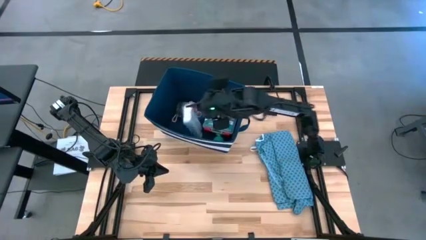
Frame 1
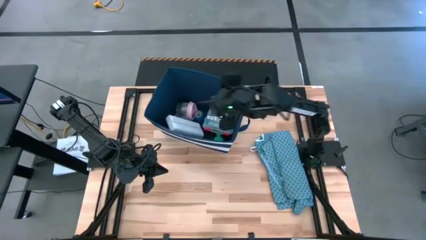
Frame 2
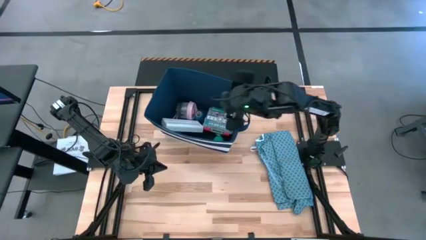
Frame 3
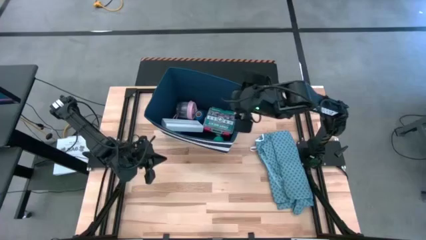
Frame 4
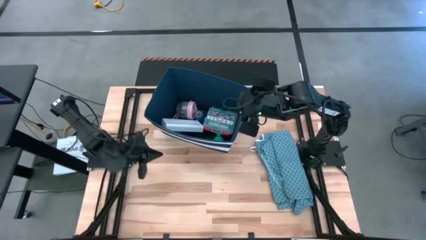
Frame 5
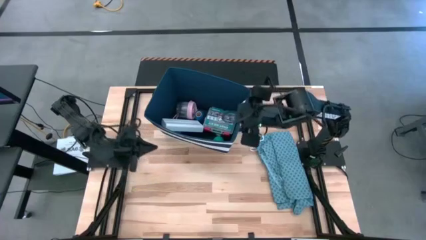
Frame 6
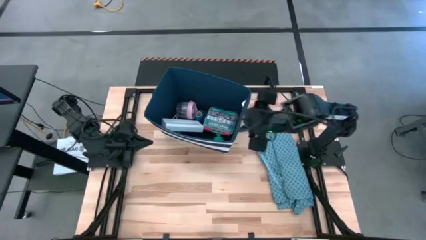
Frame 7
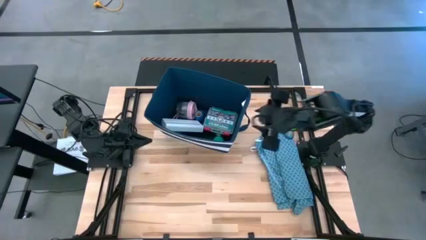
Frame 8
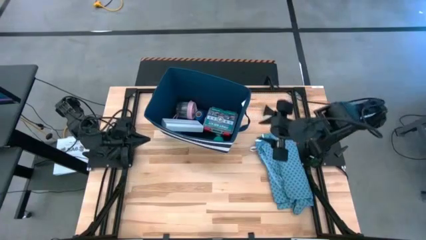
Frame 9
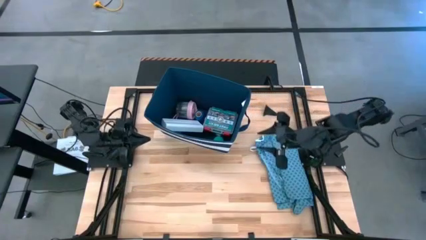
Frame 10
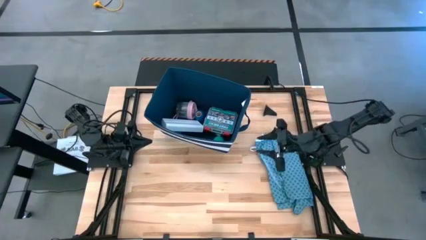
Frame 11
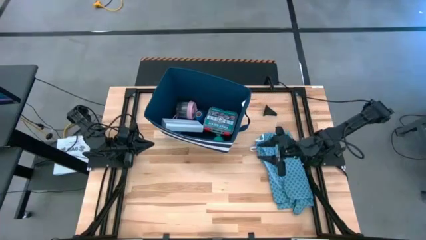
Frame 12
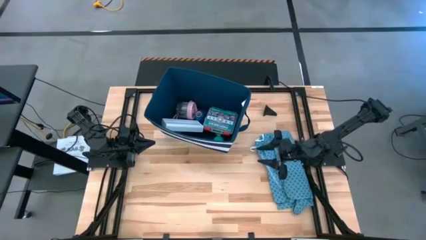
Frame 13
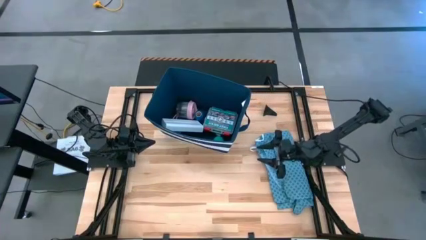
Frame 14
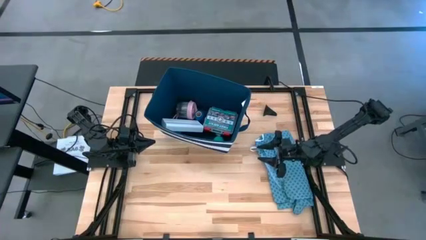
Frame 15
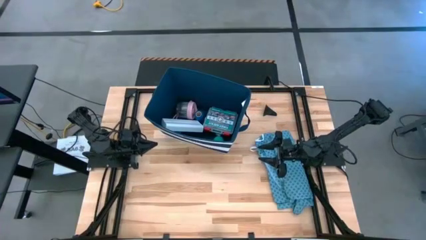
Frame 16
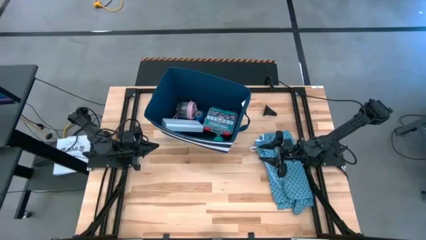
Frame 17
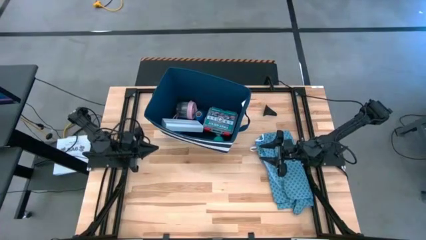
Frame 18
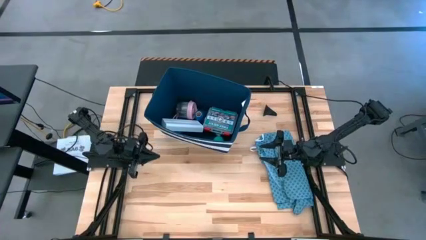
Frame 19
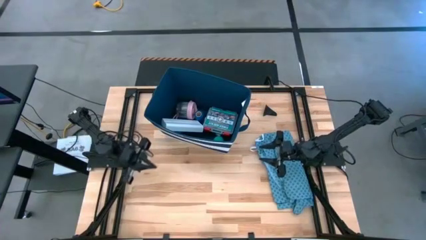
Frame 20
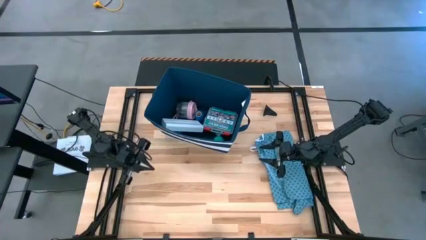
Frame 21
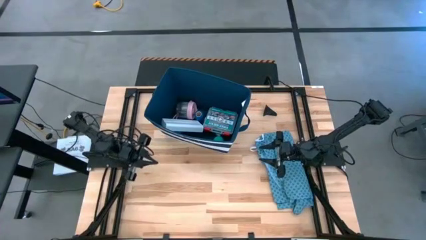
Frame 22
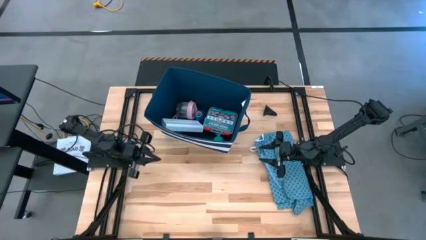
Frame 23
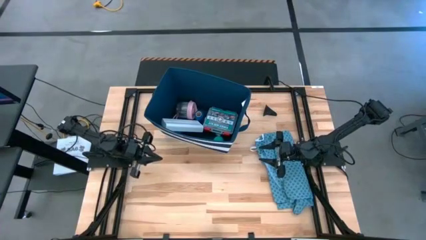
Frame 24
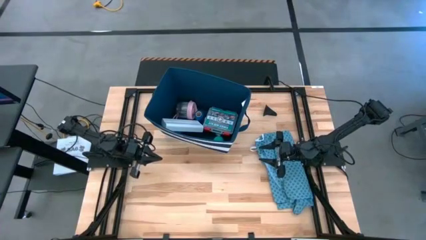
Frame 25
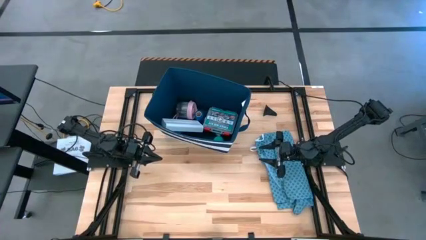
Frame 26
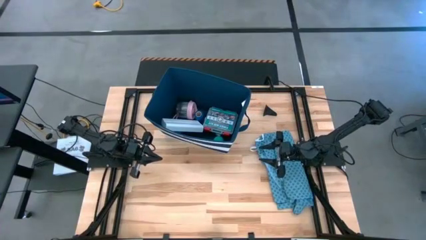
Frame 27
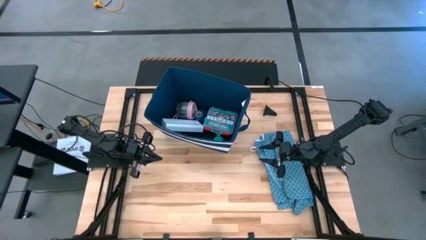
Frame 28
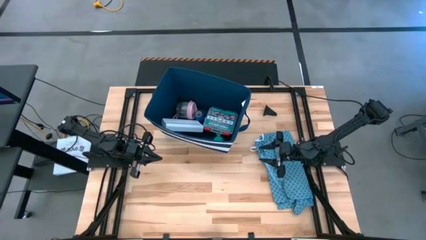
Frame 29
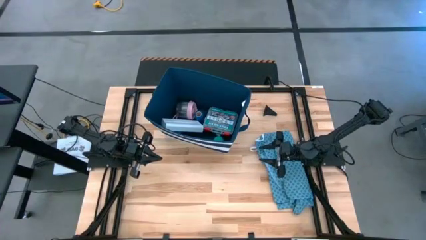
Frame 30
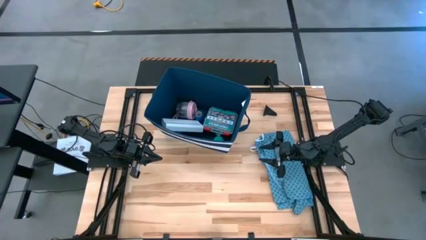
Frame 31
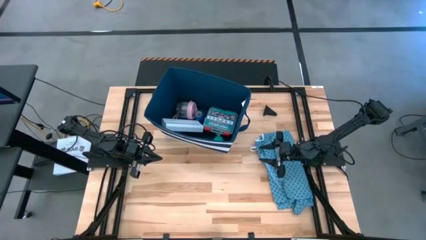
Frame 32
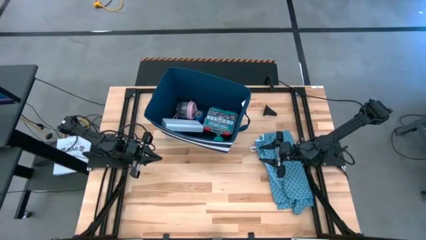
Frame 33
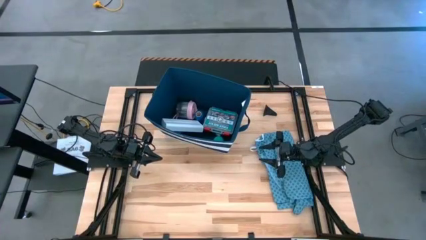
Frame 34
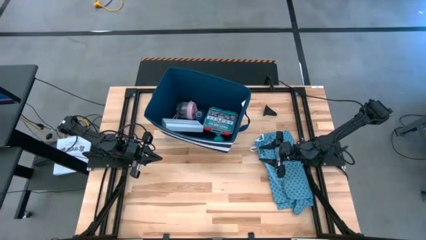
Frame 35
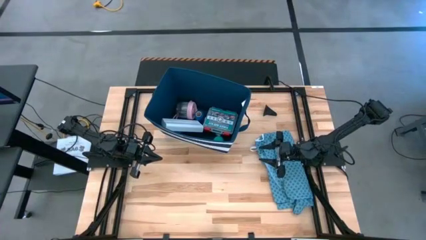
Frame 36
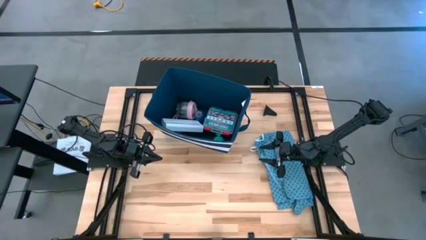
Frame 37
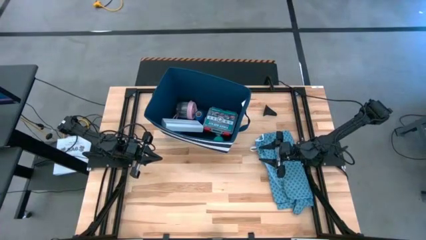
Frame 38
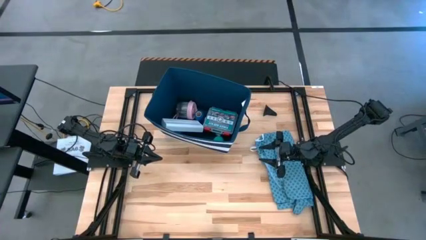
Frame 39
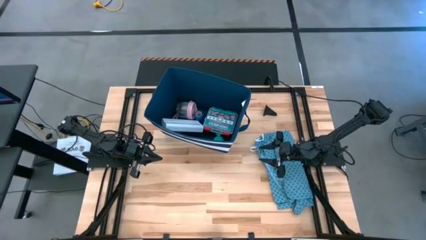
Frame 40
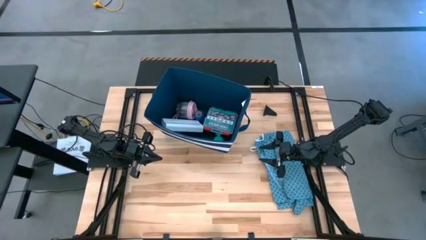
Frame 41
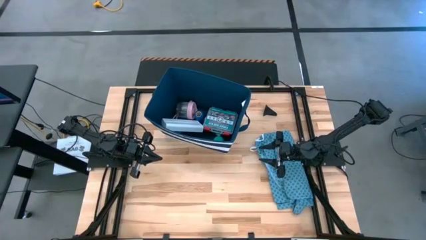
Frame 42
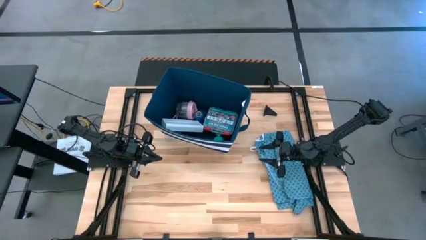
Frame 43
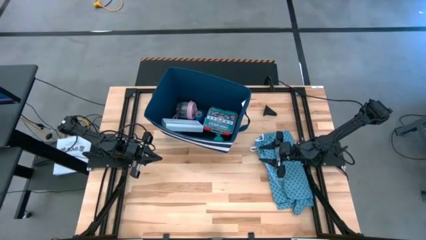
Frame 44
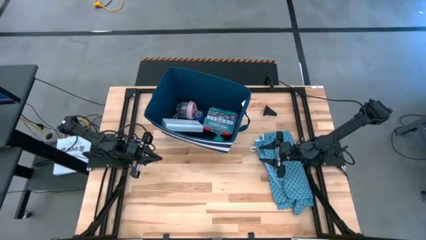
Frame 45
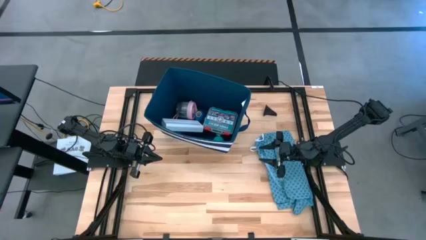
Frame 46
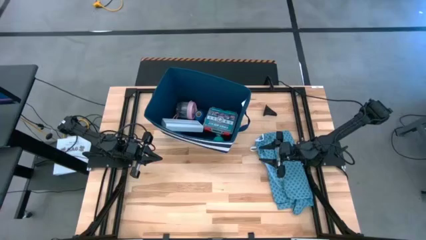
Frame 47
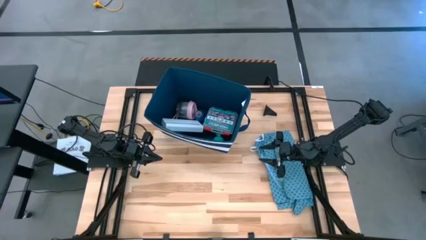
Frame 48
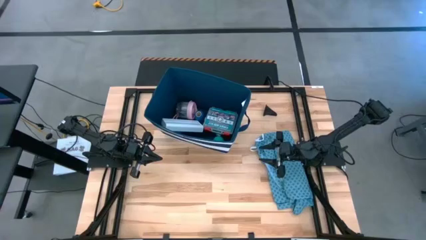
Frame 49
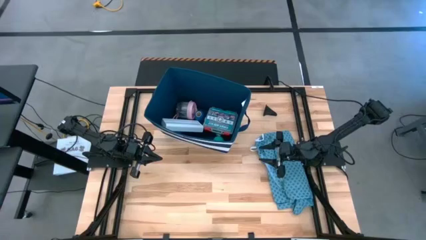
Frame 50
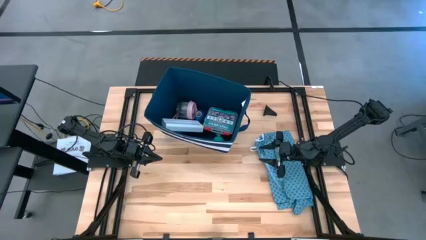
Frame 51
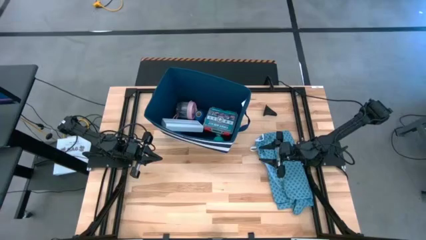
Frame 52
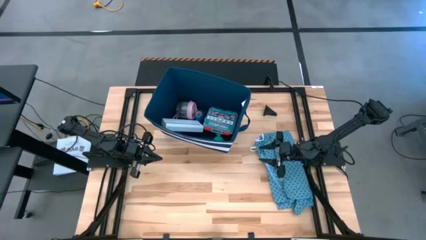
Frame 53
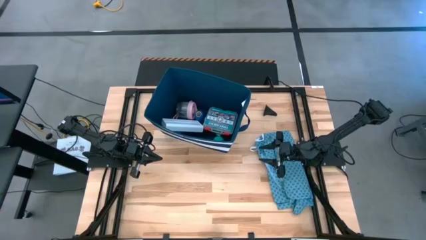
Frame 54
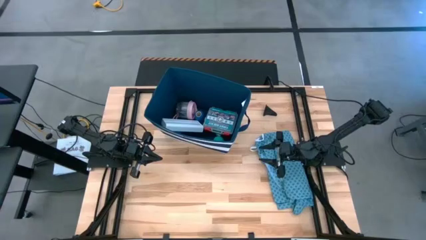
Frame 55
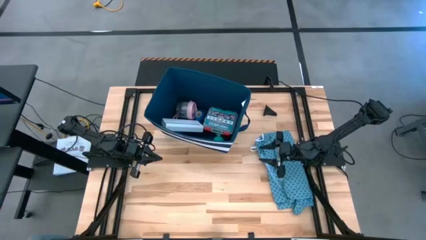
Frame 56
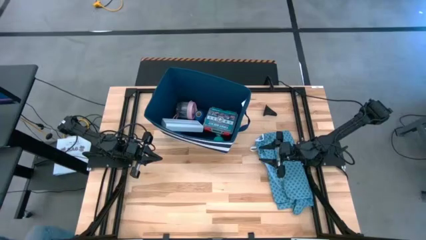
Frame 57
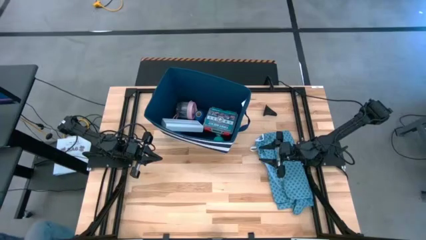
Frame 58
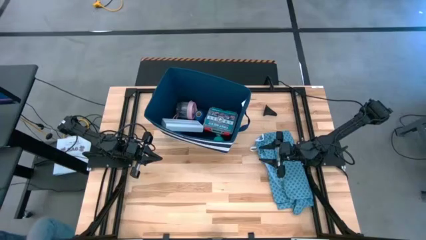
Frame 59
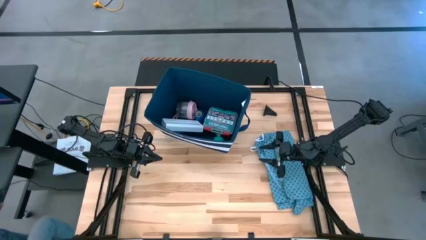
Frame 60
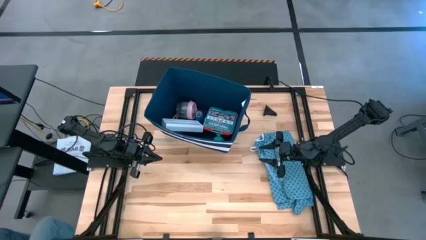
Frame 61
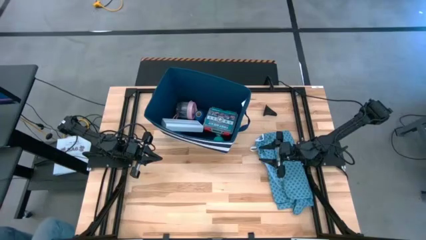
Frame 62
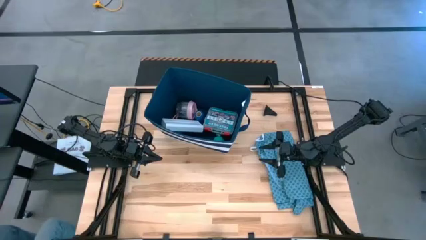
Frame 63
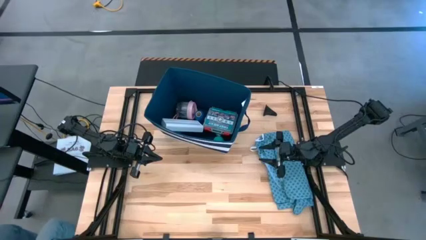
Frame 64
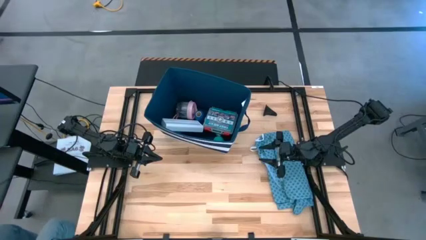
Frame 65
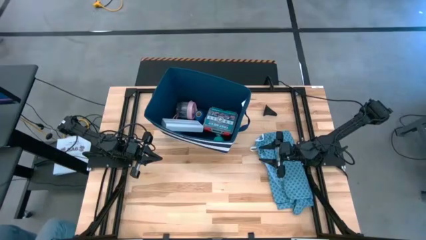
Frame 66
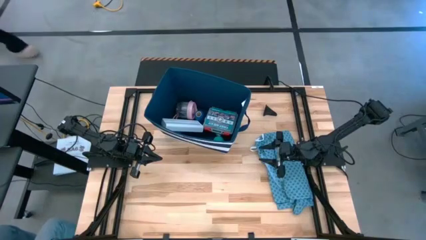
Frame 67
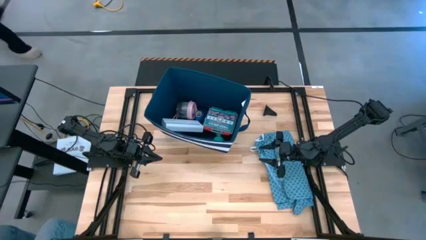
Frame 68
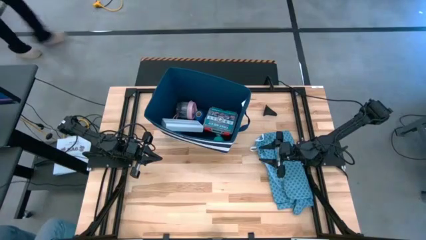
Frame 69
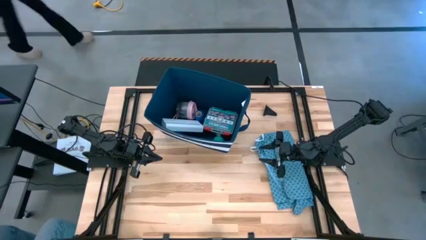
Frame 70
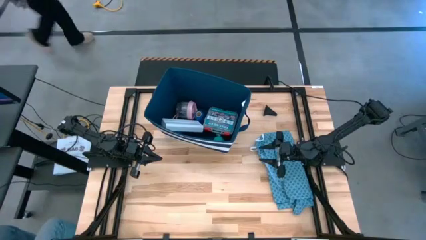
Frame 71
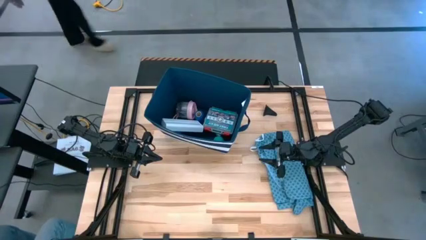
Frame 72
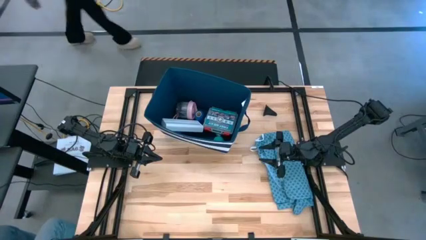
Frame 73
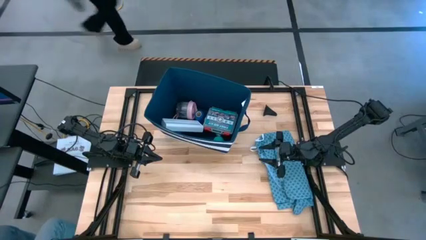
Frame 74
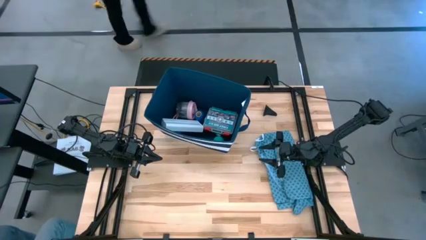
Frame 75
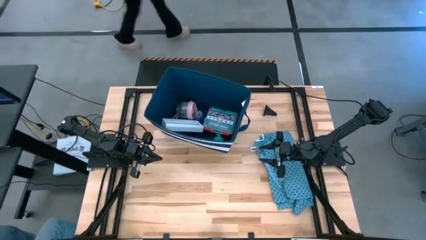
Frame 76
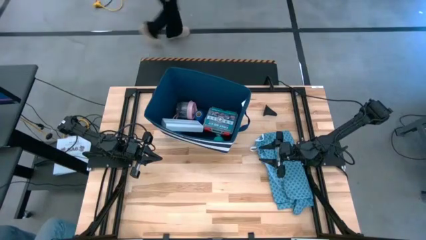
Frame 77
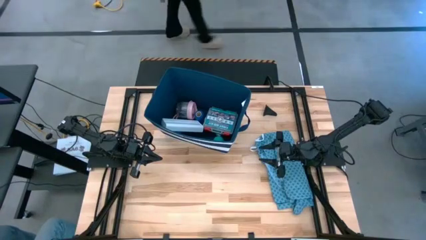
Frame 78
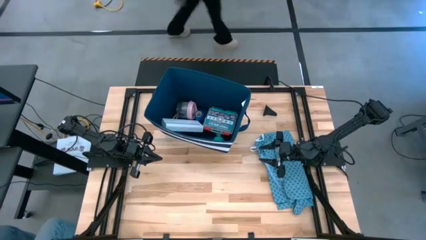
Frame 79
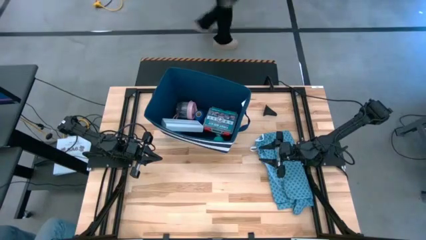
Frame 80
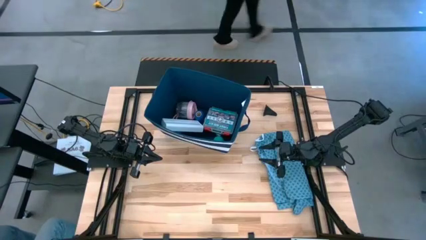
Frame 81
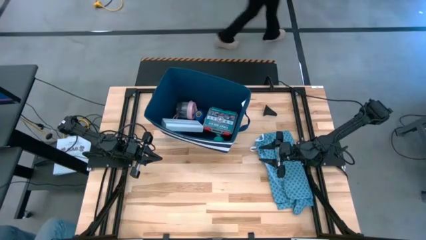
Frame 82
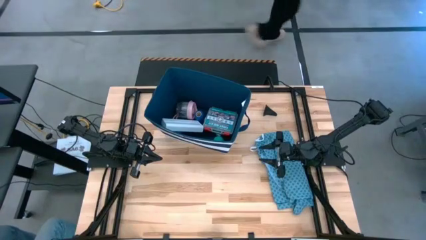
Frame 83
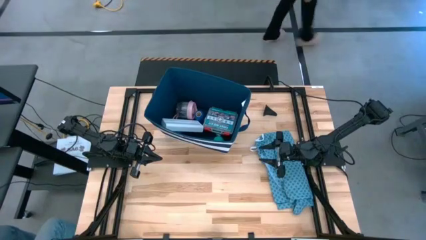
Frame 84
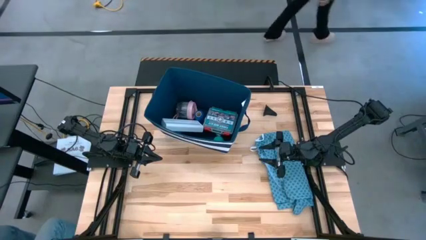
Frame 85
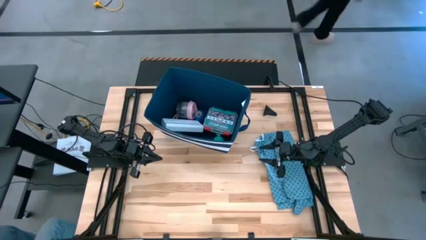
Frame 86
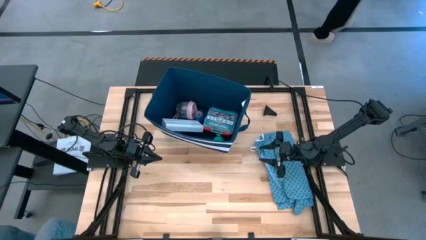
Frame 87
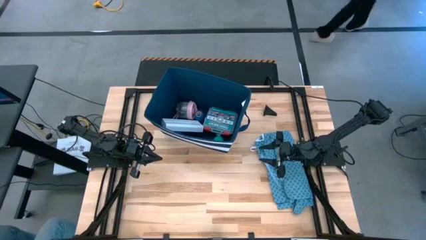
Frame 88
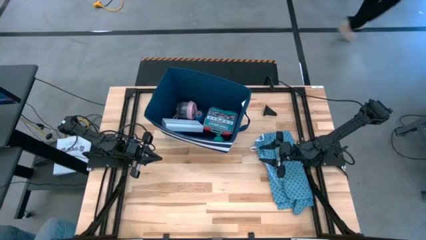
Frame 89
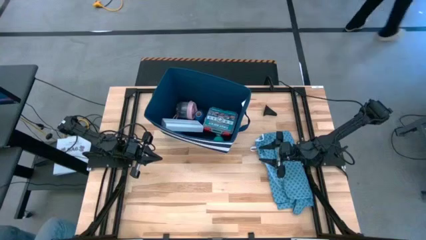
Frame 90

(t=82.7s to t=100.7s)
Task: Pick & place medical supplies in basket/bin
Return to Home Position
